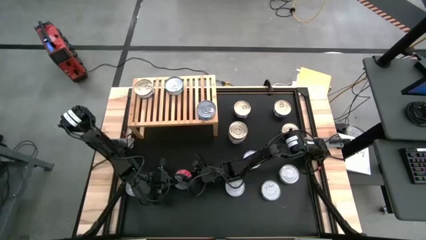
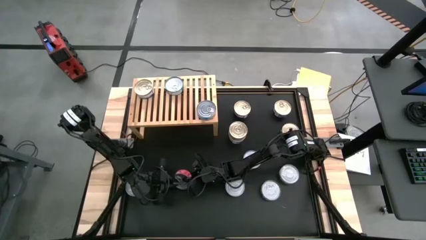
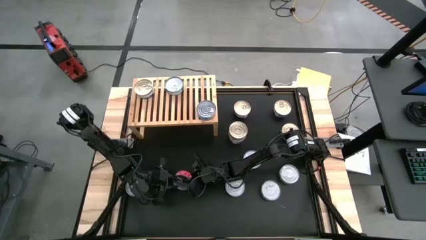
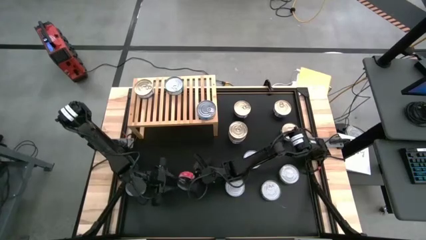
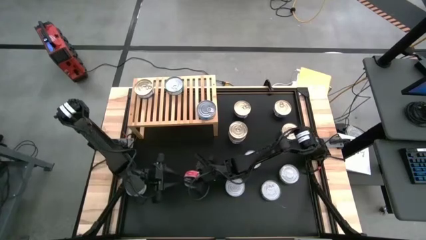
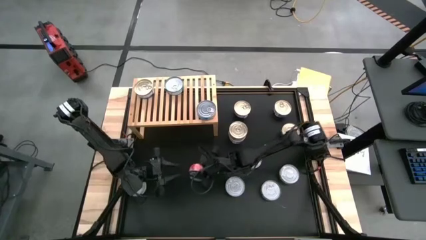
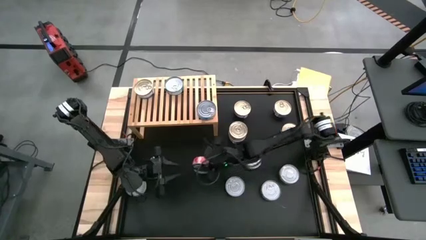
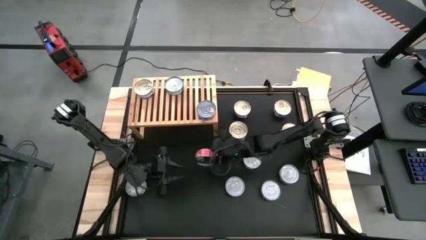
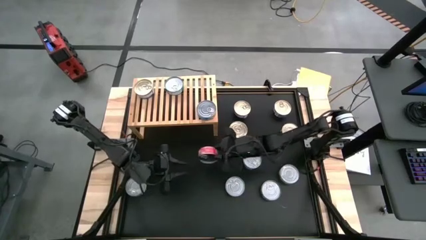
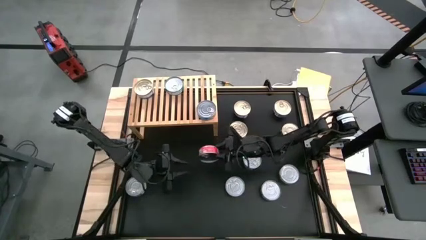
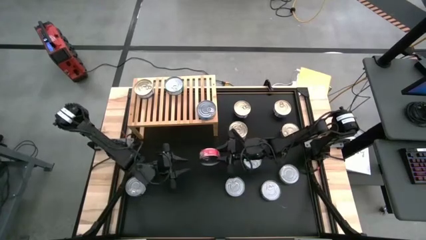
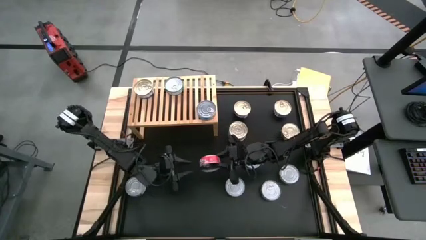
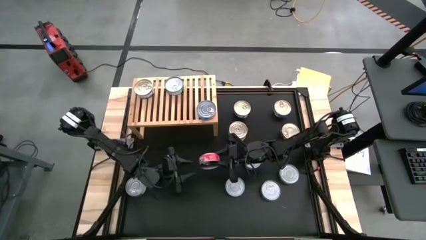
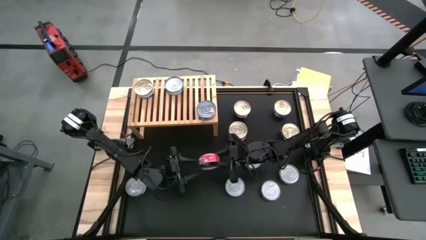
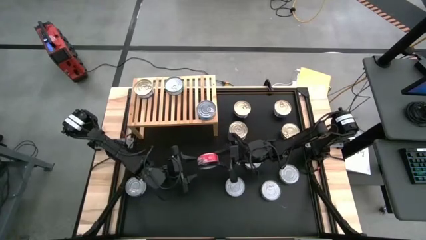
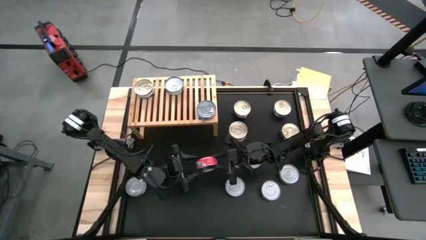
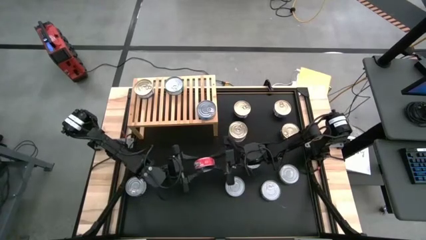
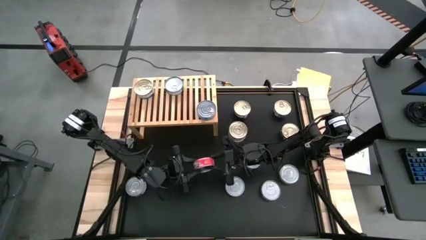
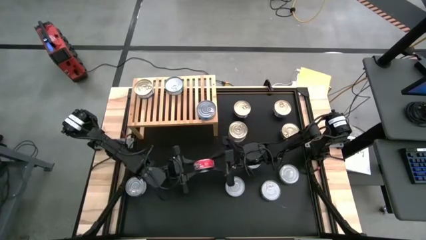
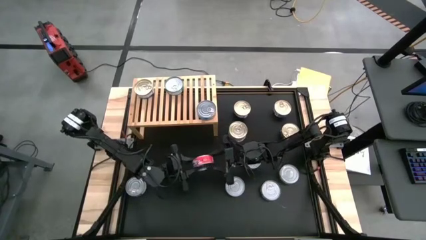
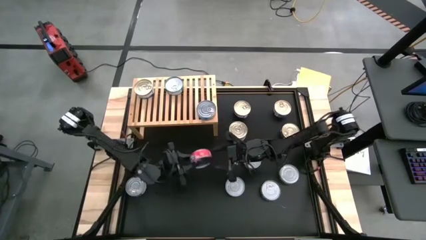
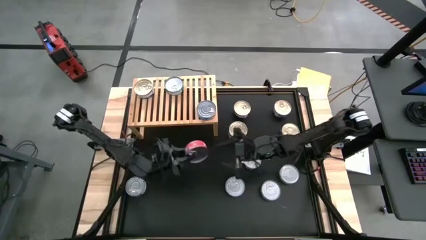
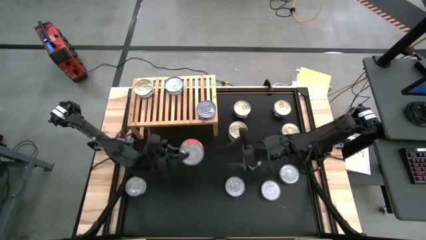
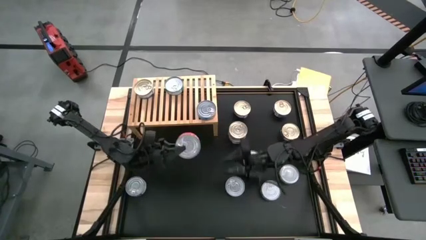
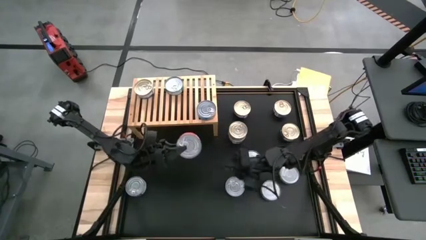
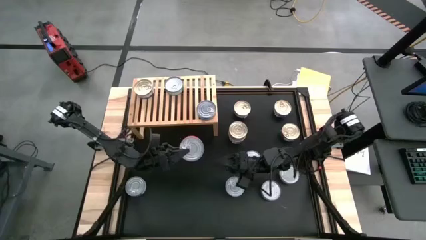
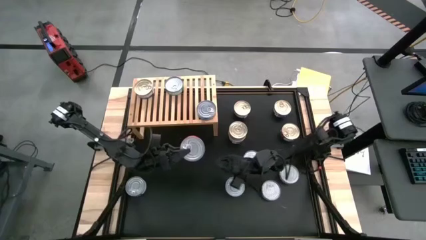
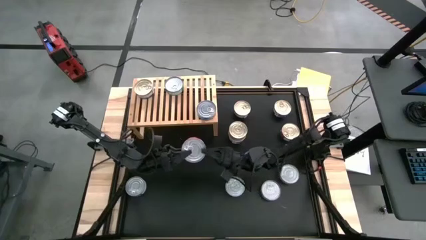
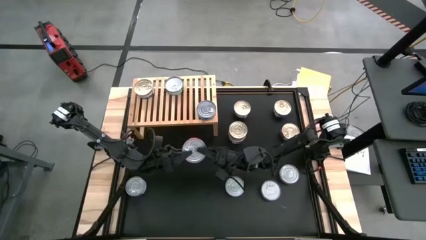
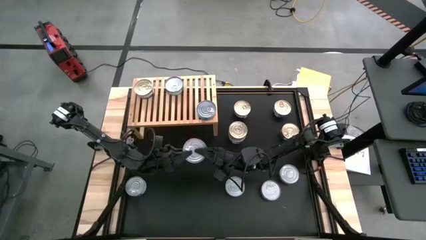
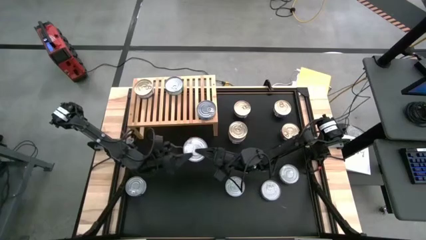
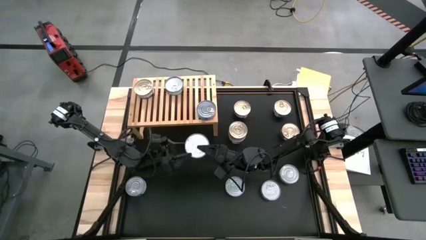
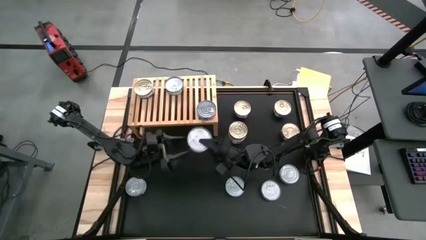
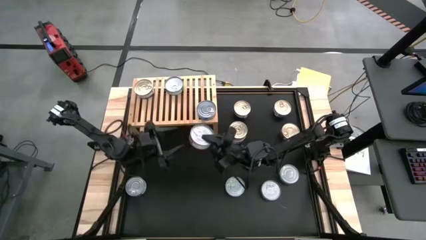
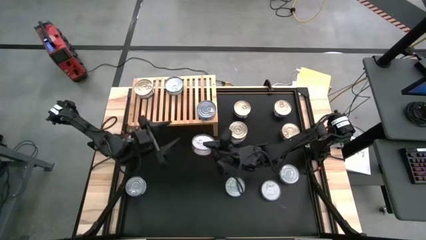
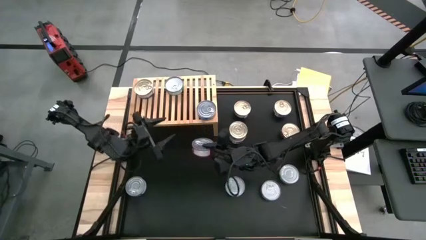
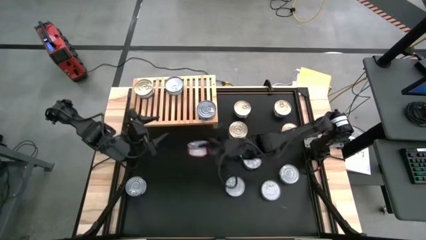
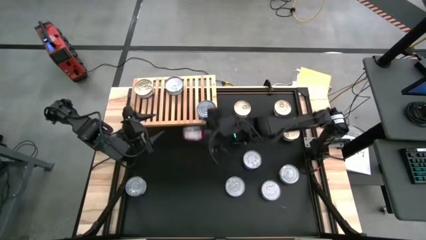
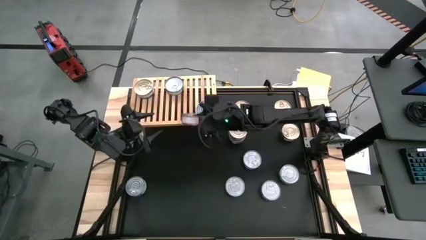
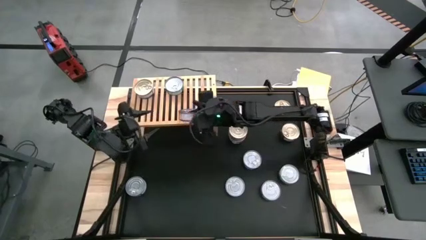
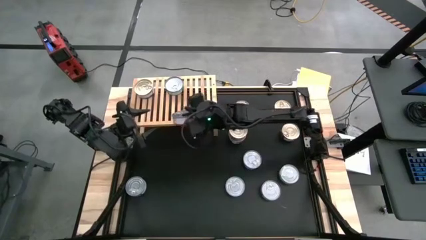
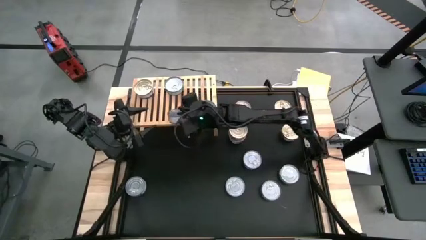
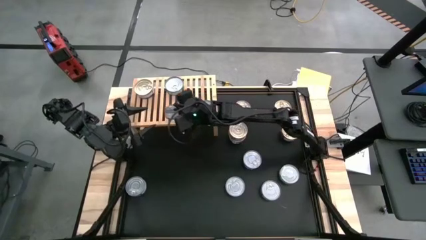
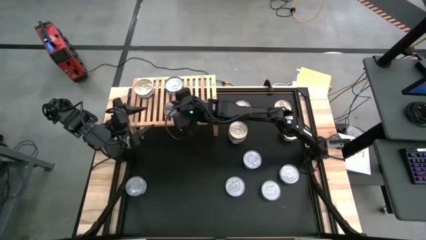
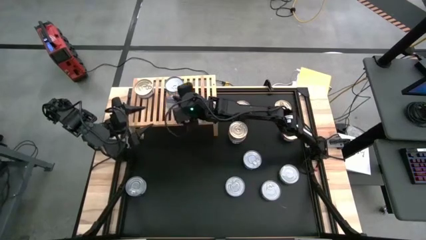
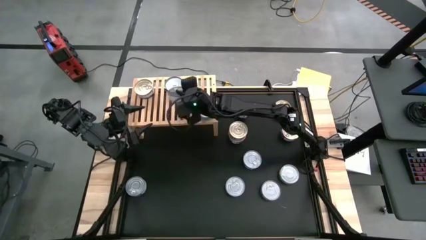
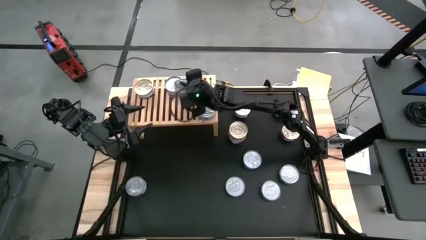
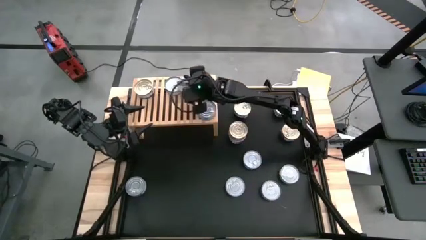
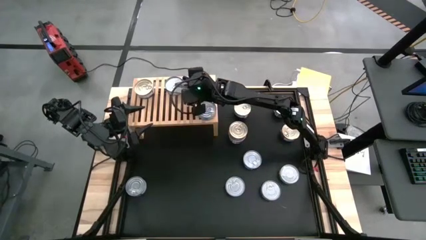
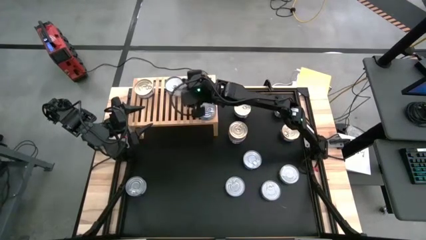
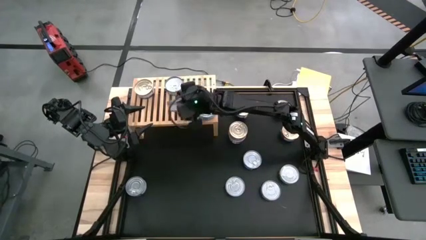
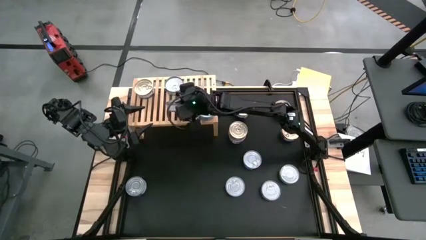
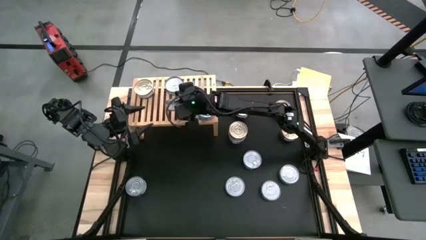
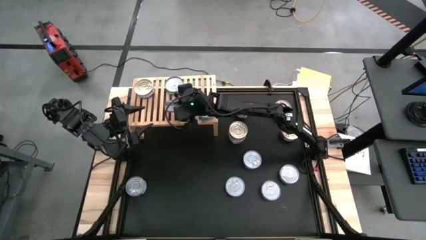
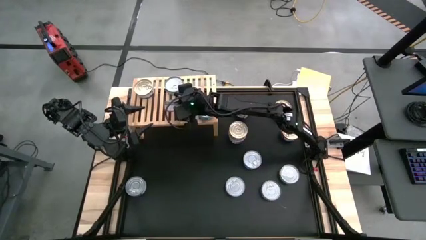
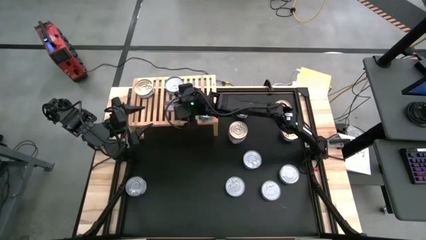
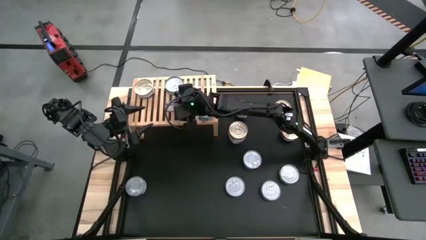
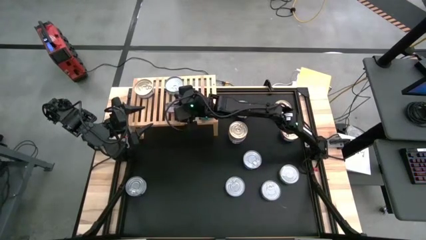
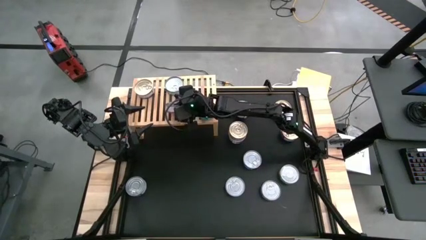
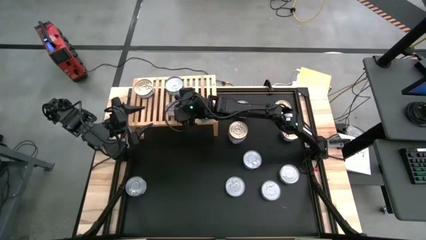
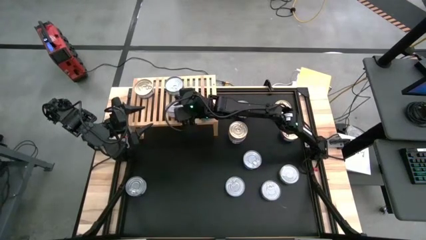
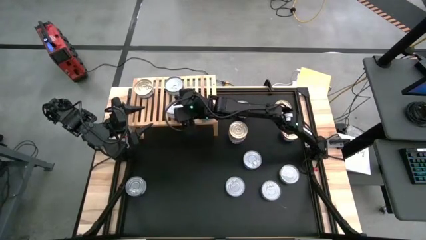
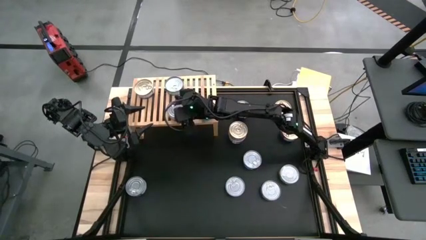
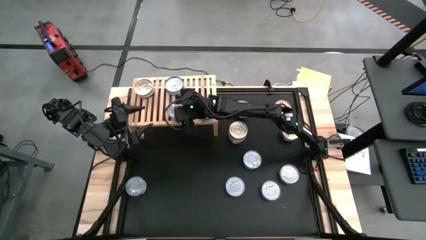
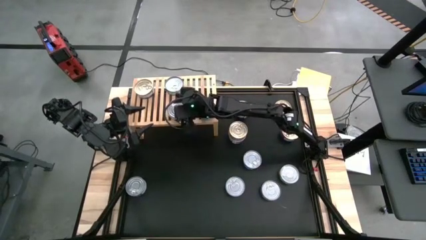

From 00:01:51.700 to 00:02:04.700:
Task: Stack canned seafood by type on shelf
Put the red tuna can on the shelf
